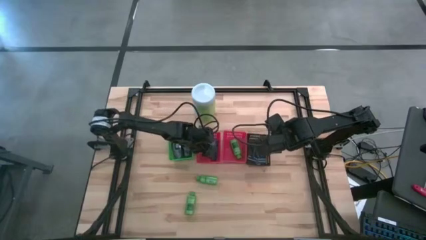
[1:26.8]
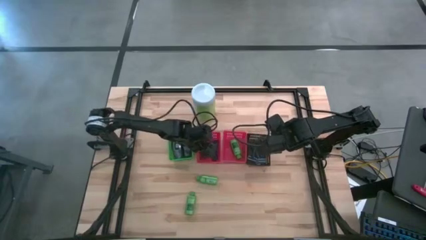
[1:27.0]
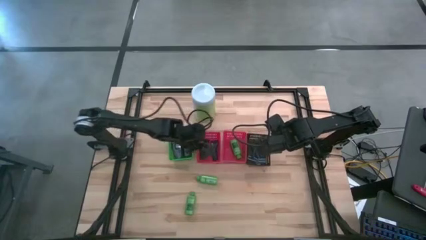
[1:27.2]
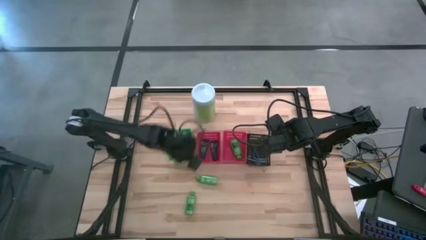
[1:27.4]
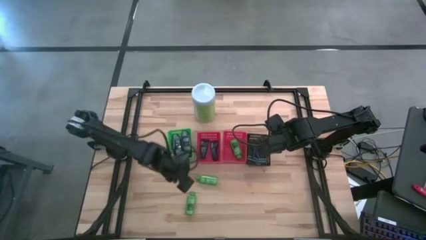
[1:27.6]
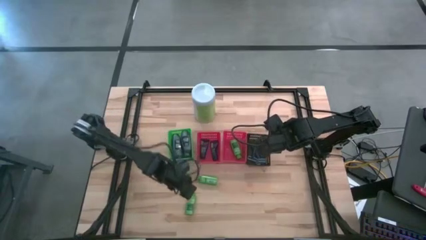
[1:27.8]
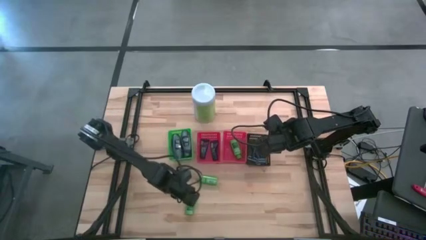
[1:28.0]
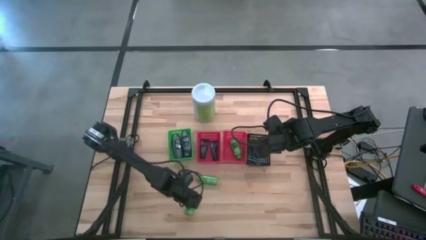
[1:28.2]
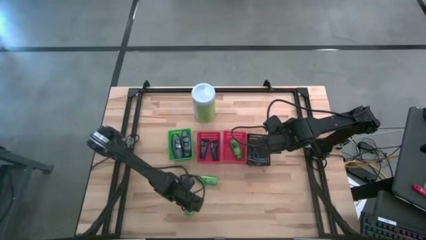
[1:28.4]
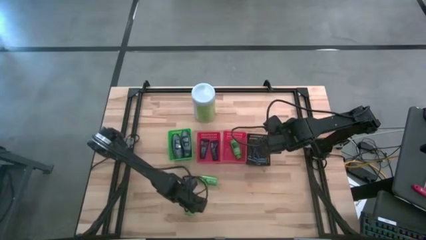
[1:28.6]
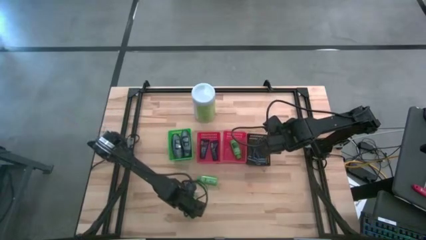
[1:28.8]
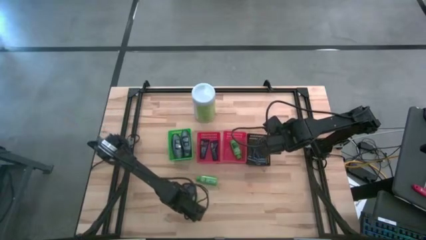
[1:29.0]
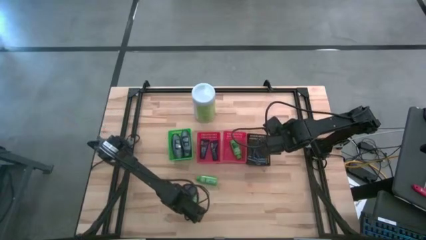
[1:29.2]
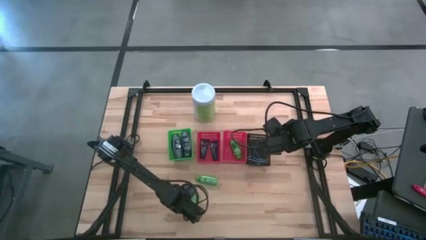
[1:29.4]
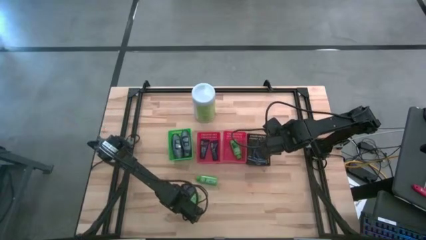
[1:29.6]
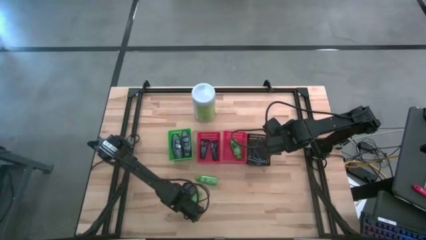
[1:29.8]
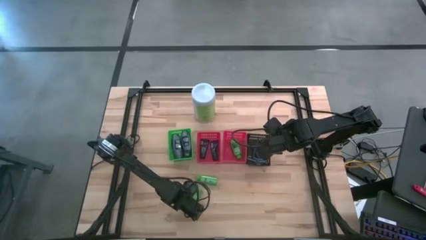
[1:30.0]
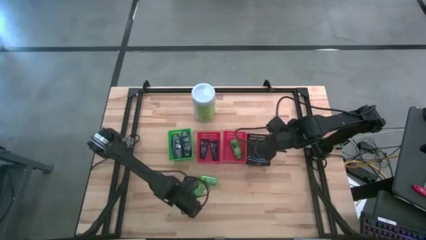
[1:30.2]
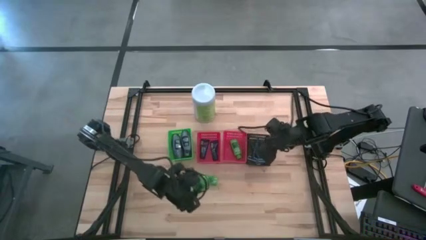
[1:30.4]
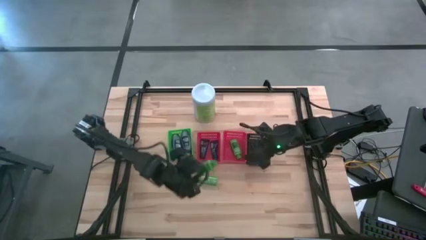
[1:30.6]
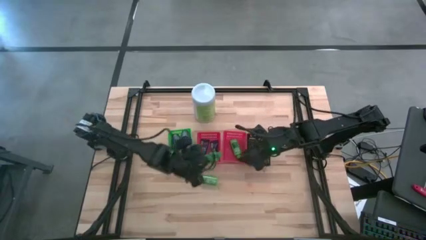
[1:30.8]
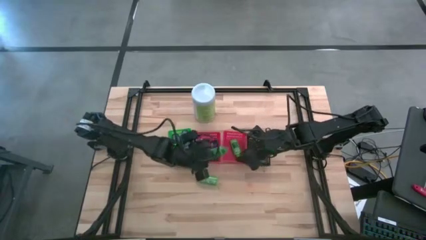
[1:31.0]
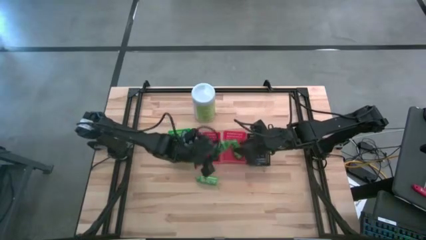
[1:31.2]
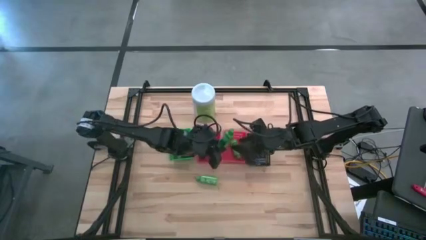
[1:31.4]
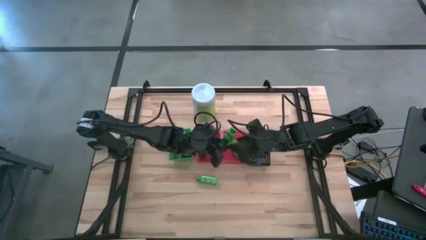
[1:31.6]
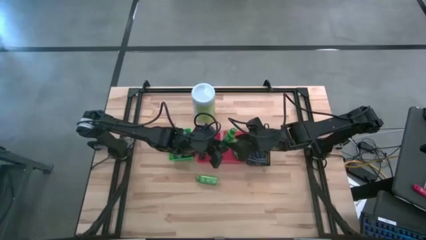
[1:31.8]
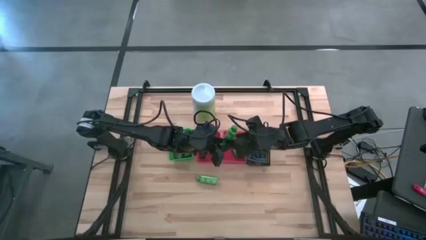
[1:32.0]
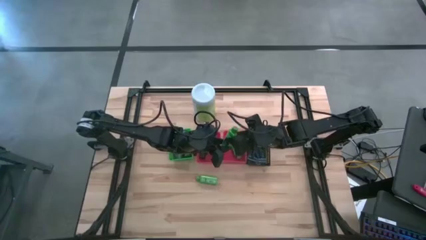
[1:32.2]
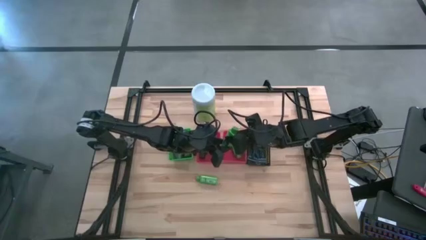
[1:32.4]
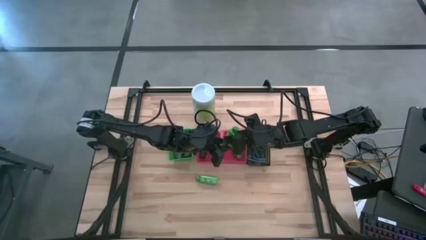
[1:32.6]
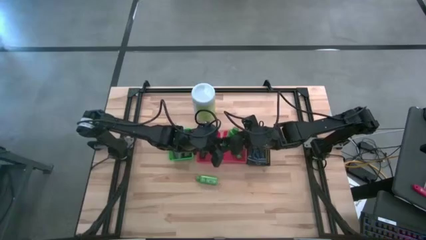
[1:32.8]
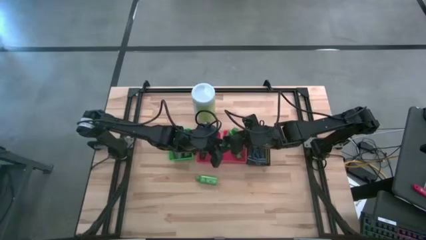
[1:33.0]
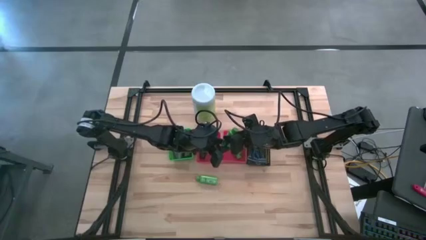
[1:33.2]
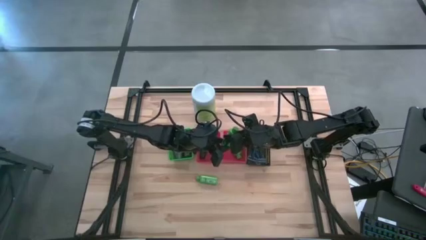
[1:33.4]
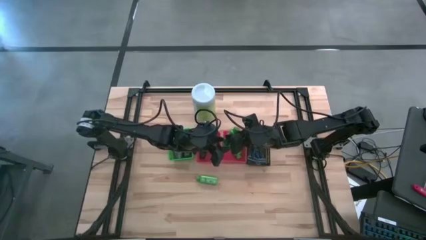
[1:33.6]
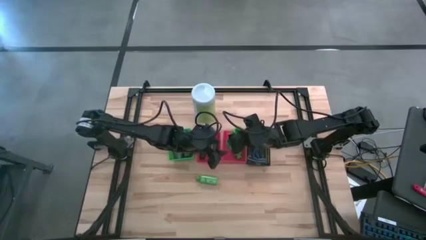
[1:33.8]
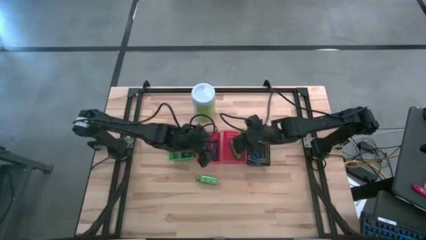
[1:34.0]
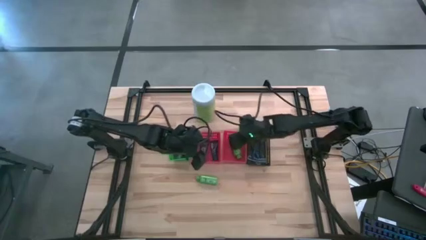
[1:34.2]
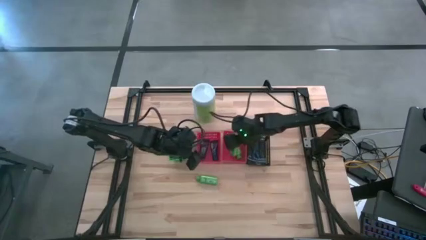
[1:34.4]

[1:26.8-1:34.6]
Task: Pick & Place Travel size toiletries
Put the bottom green shampoo into the left red bin

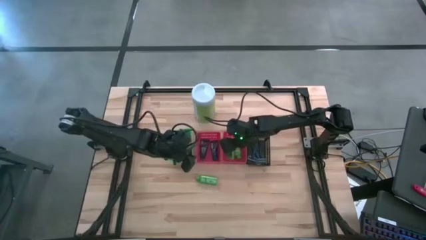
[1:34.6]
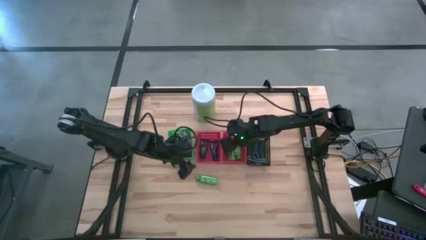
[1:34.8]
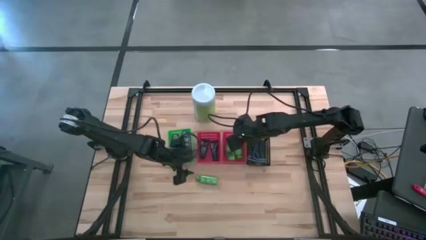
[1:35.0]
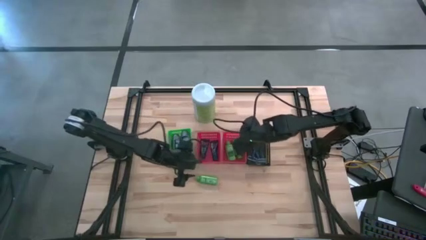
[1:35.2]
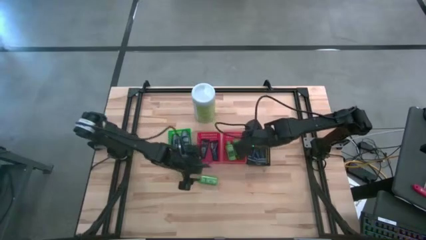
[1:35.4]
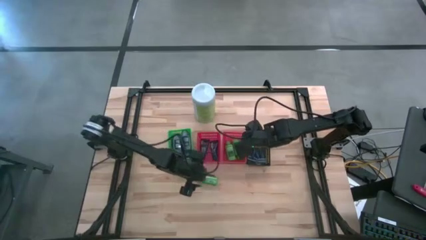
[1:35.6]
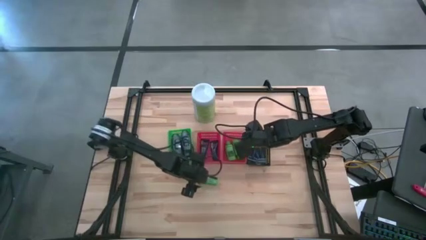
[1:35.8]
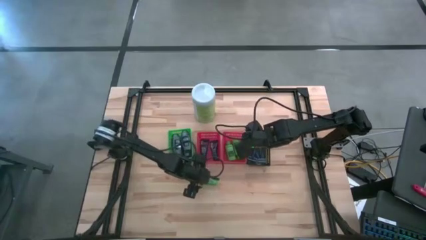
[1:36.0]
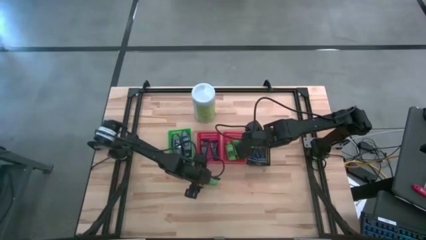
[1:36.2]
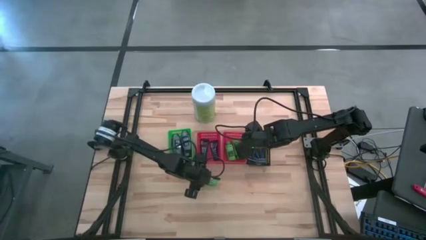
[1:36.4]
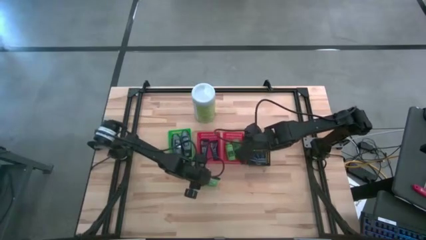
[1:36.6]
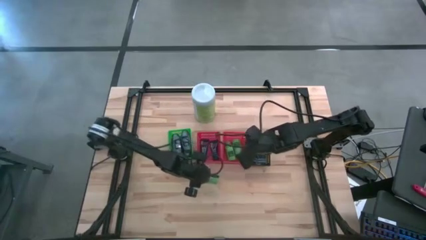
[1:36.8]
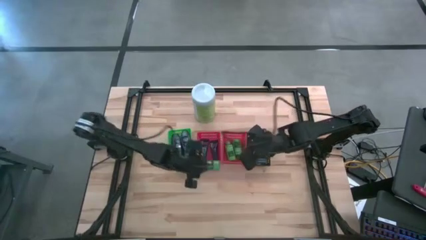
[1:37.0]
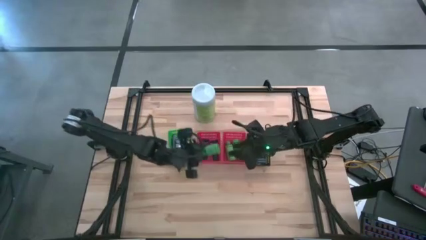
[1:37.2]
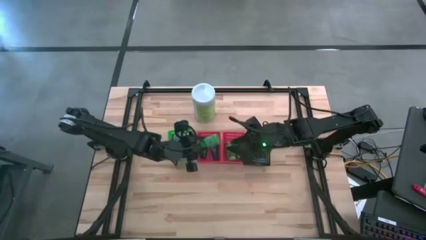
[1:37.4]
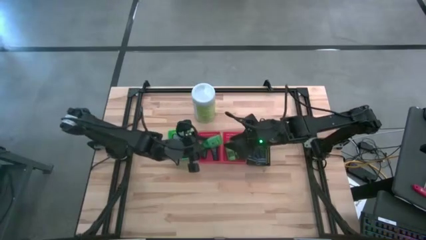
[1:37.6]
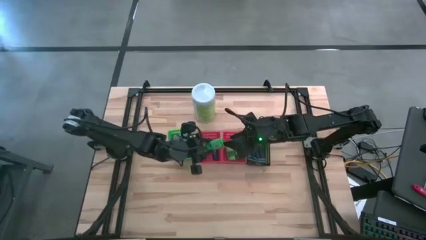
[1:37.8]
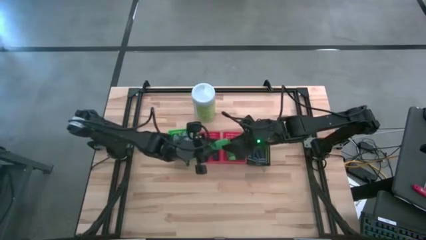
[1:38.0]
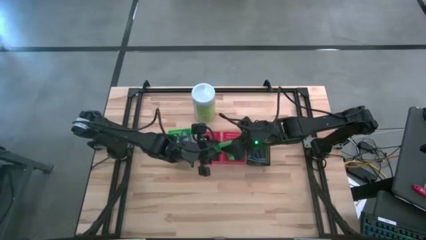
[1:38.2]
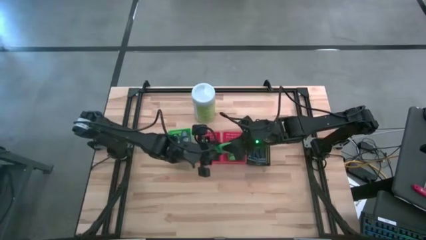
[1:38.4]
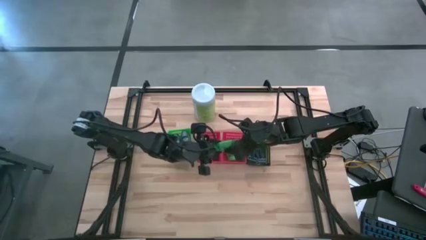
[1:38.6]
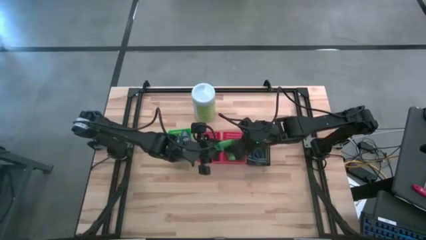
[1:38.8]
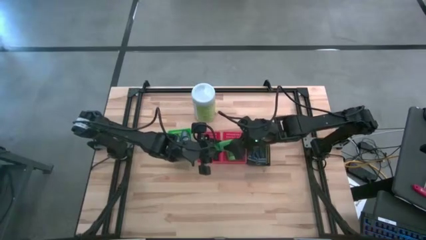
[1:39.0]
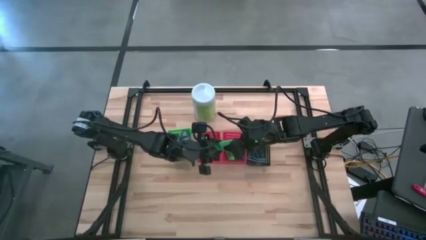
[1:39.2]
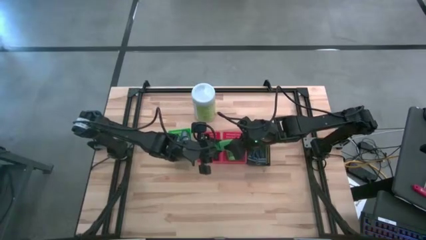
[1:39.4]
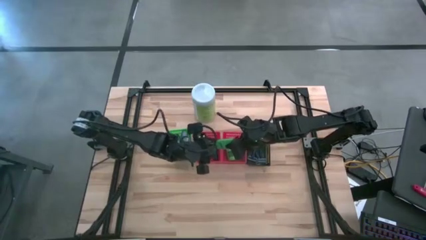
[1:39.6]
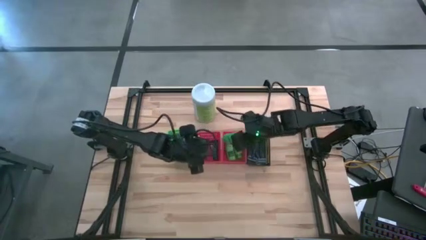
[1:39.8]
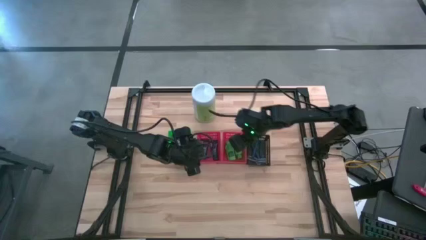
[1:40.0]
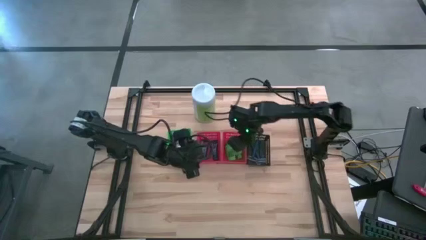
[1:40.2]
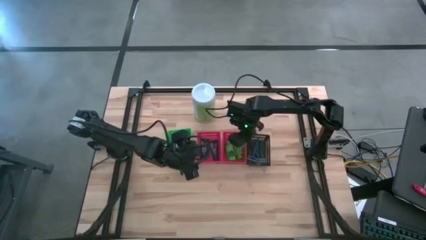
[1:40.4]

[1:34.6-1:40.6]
Put the green shampoo into the left red bin
